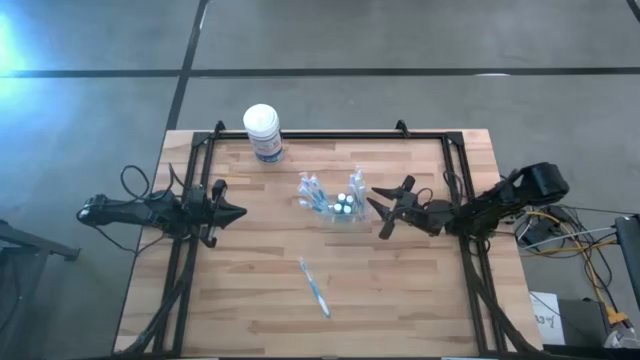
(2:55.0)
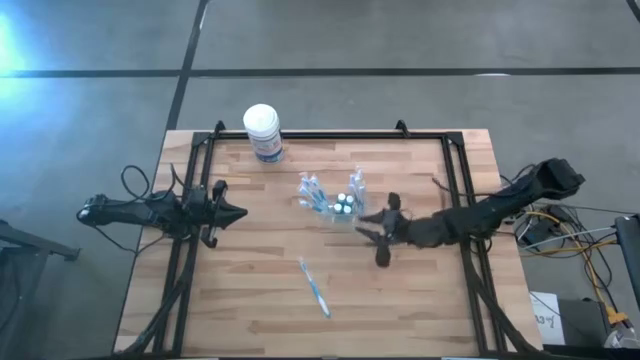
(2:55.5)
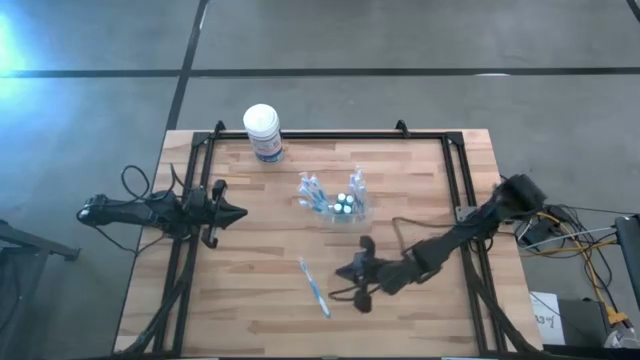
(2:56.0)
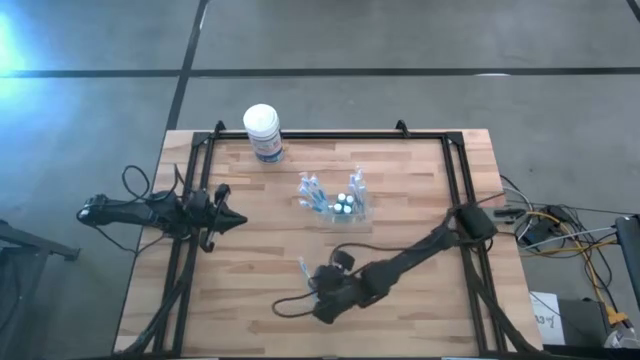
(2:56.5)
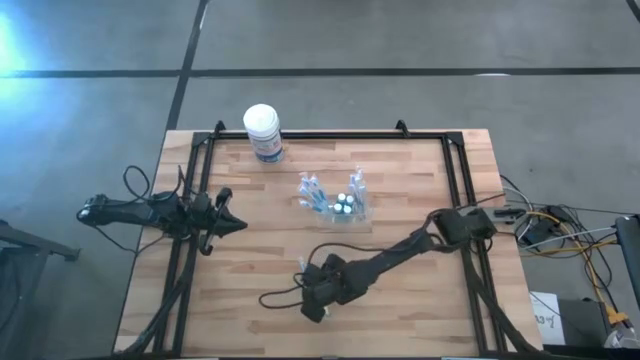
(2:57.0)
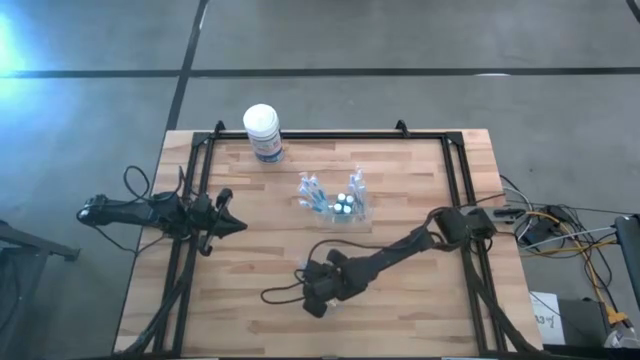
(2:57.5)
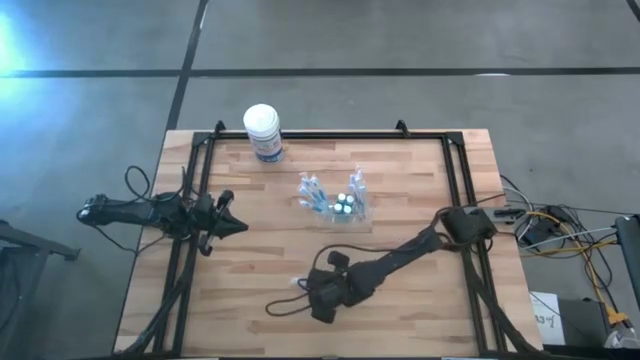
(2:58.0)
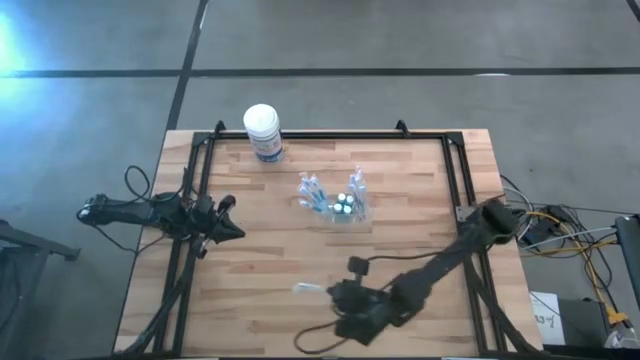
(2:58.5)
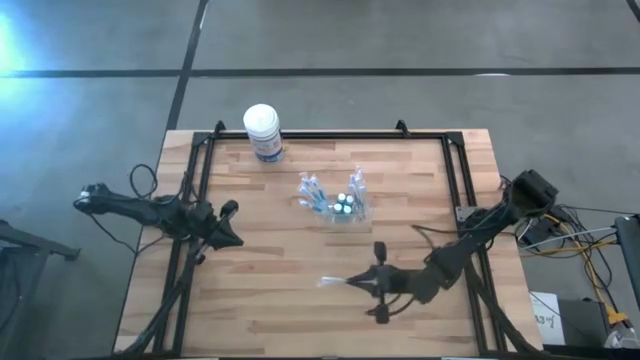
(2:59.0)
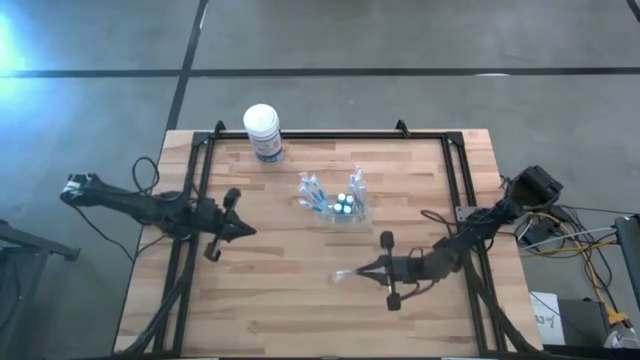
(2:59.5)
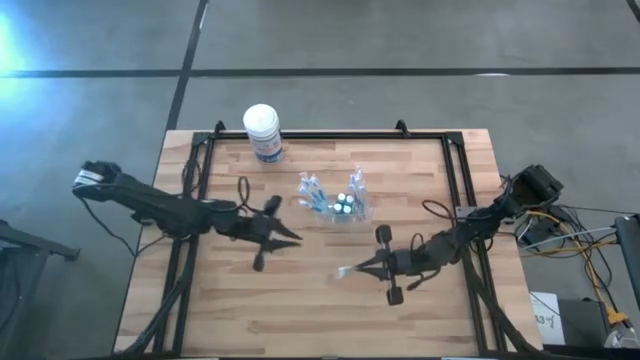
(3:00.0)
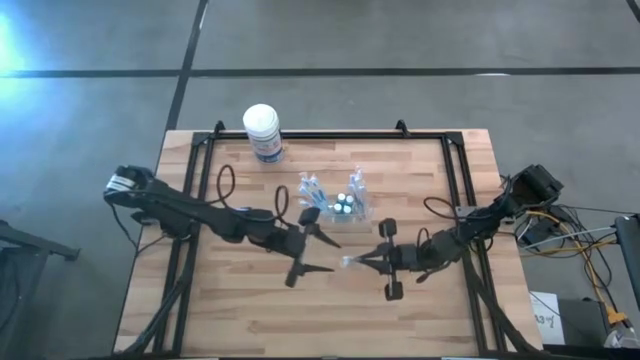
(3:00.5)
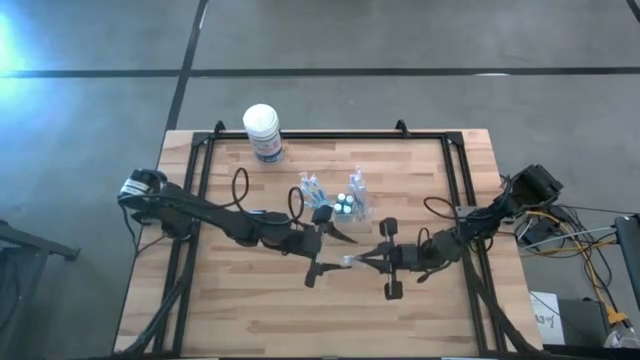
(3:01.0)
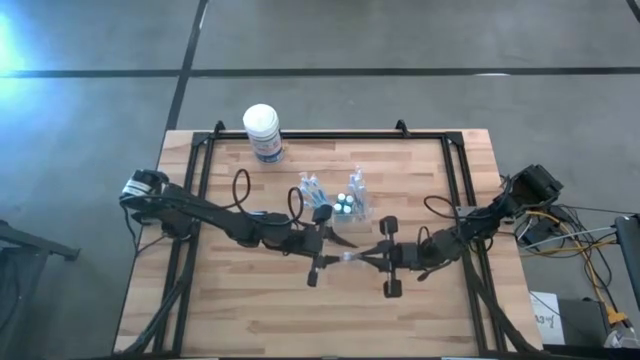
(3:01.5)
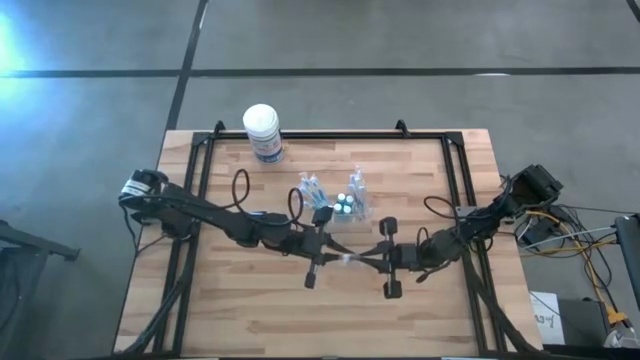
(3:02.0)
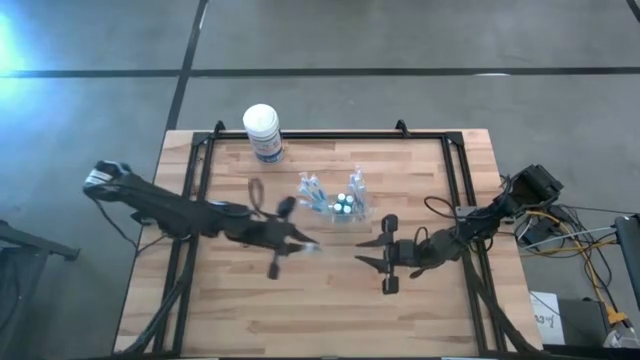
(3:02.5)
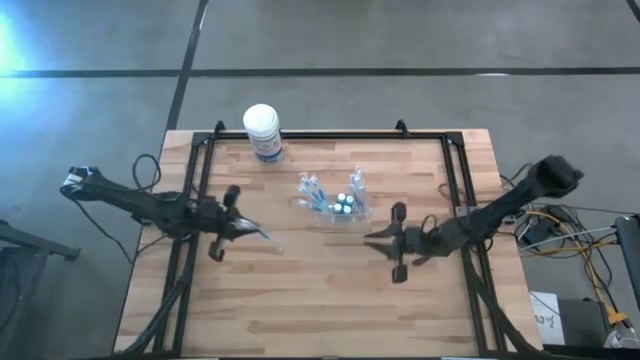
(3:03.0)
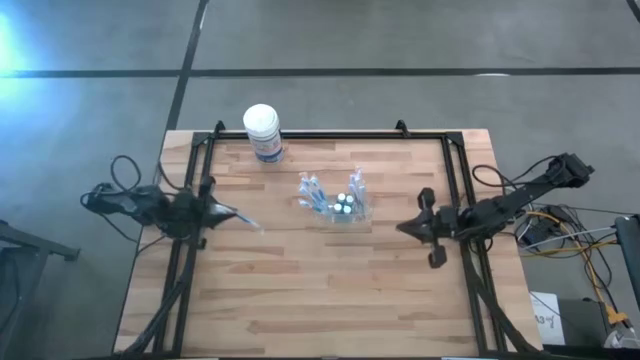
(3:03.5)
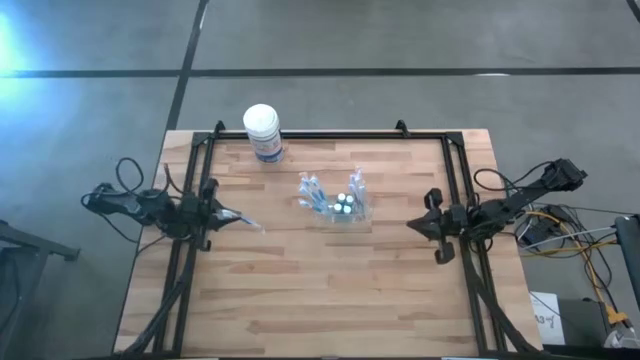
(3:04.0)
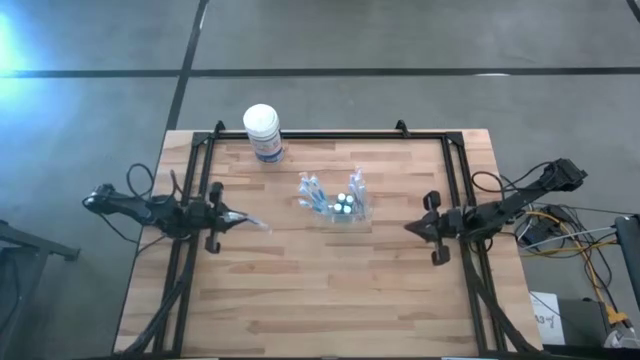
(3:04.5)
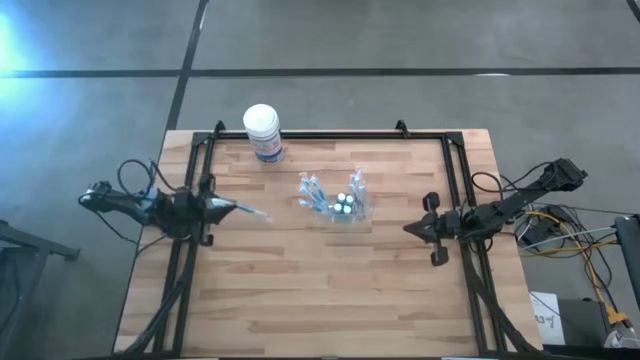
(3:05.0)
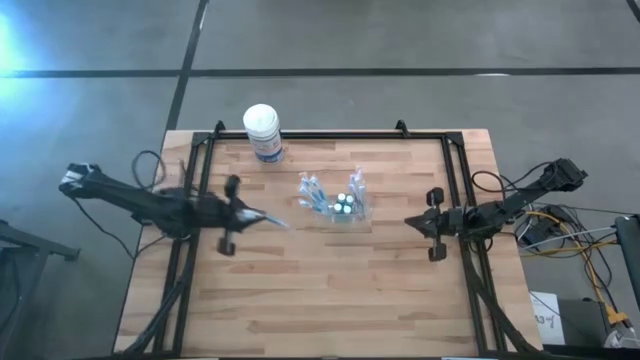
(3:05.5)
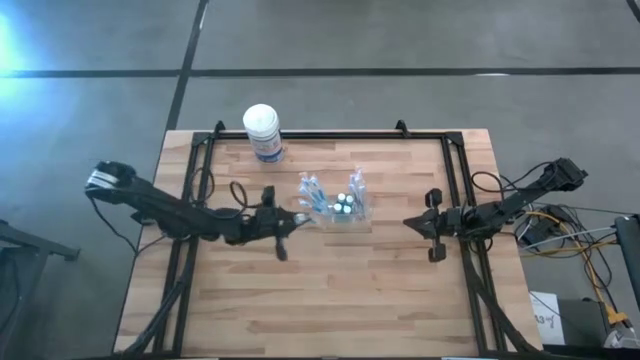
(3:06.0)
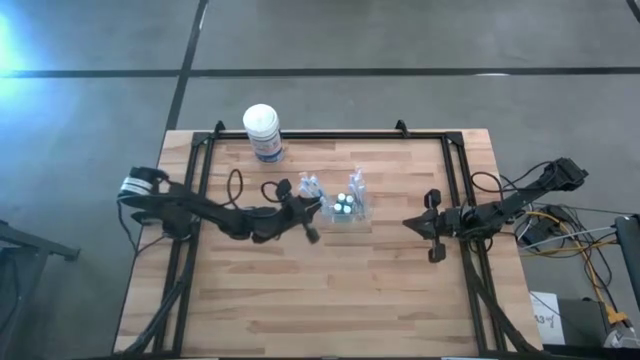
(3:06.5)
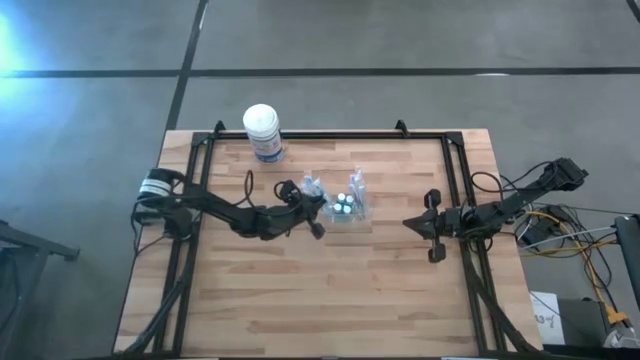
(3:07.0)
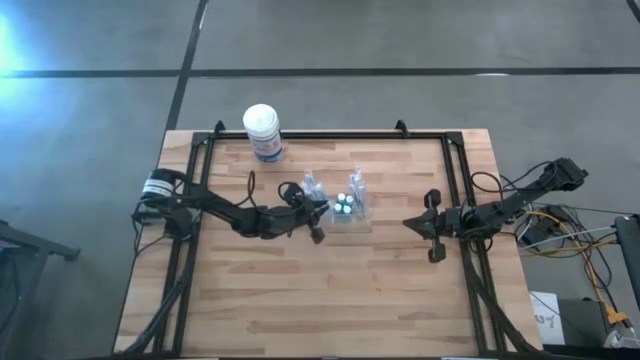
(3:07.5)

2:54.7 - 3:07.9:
Task: Pick & Place toothbrushing station
Put the blue toothbrush into the transparent organizer

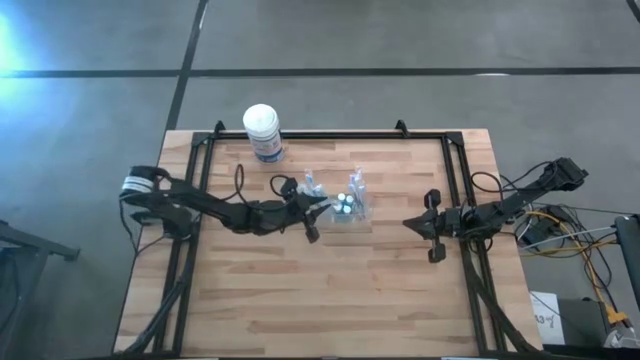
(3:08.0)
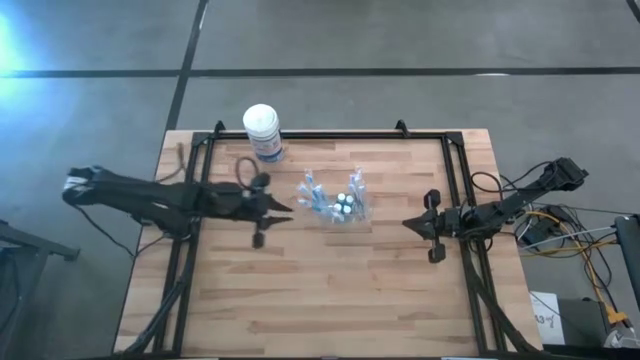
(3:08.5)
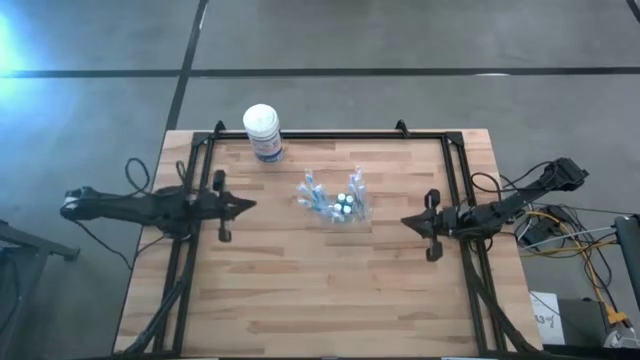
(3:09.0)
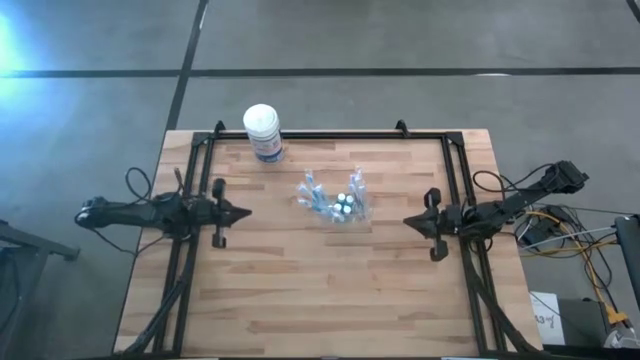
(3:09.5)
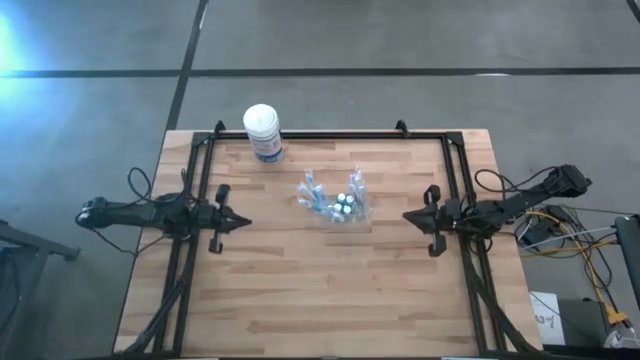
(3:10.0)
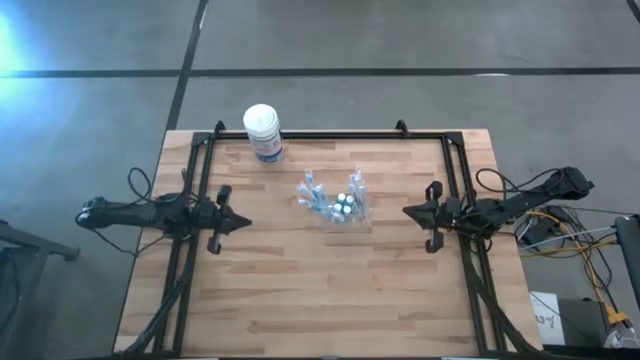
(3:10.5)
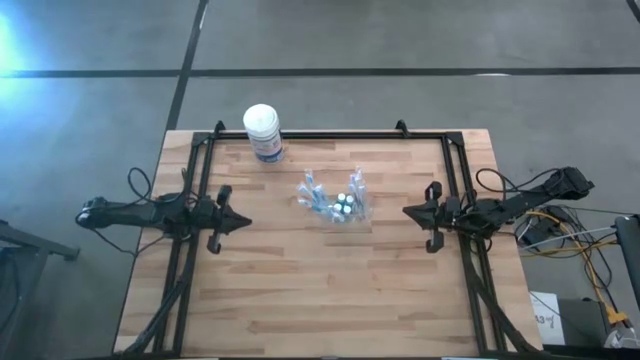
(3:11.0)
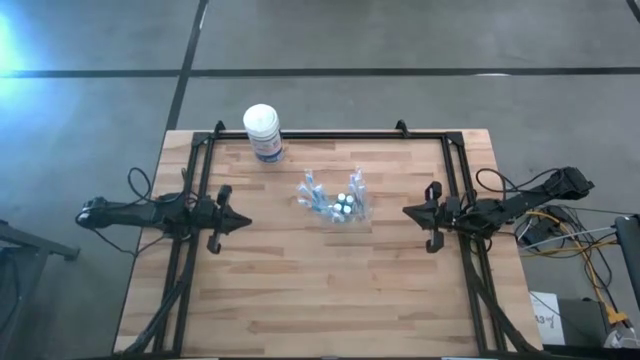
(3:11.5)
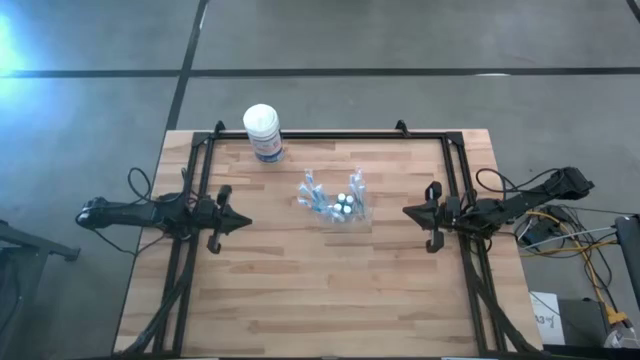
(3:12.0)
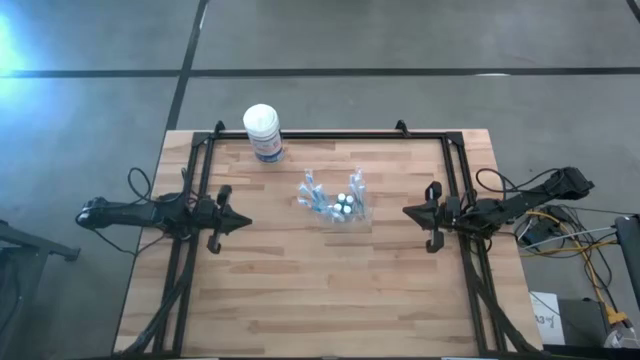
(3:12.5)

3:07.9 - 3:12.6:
Return to Home Position

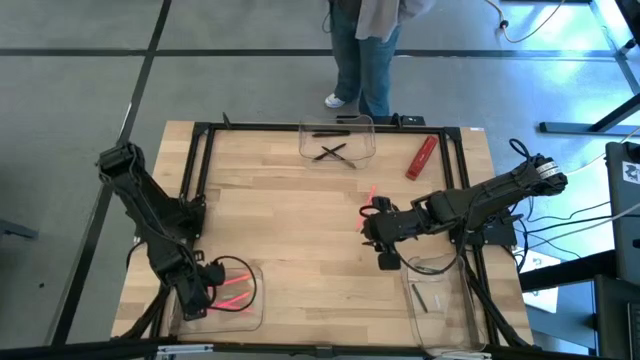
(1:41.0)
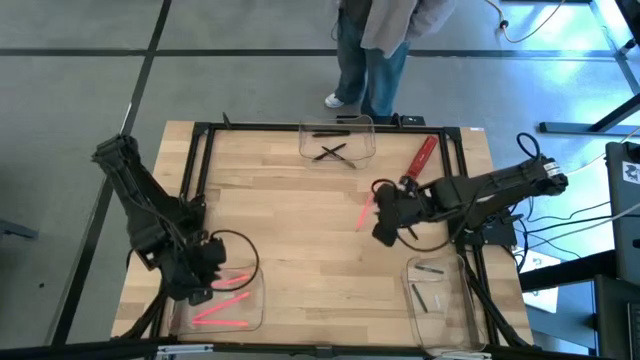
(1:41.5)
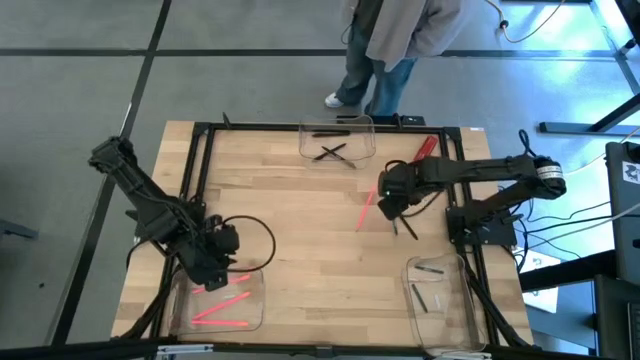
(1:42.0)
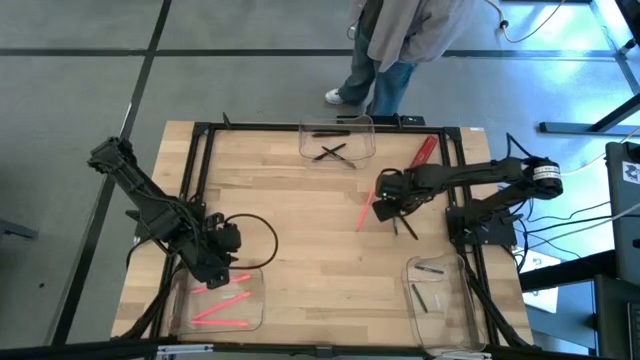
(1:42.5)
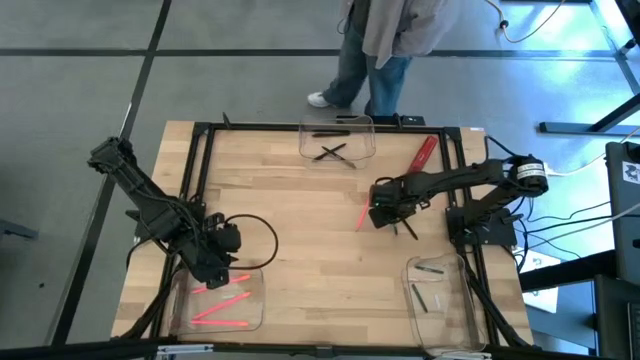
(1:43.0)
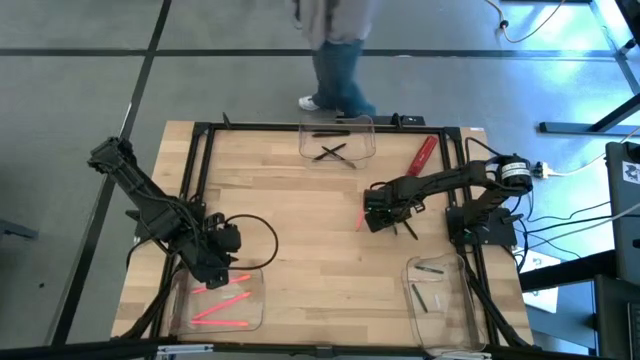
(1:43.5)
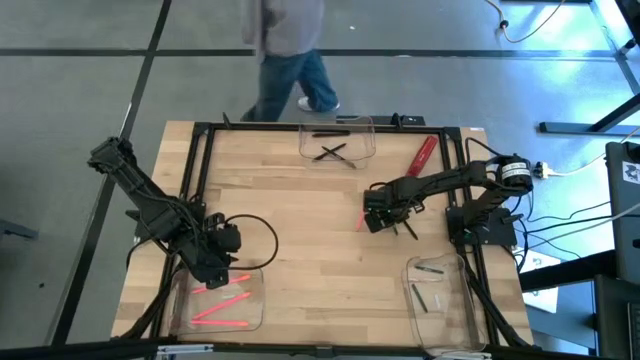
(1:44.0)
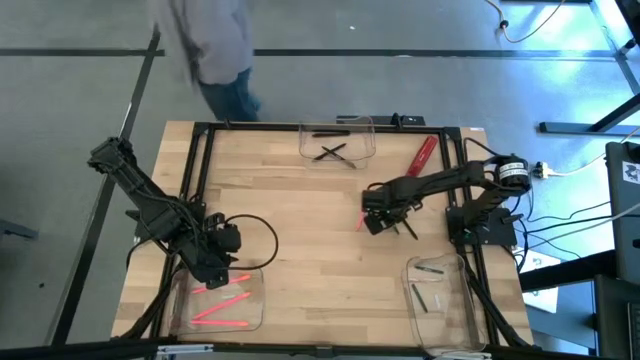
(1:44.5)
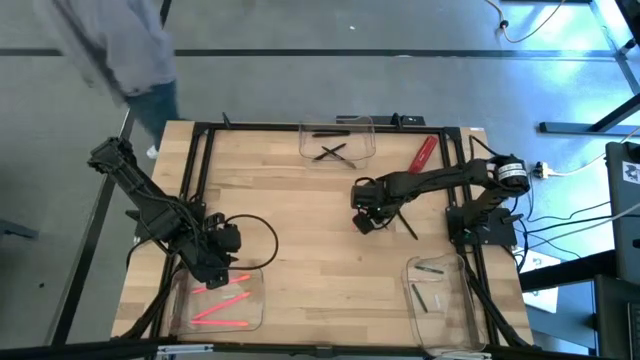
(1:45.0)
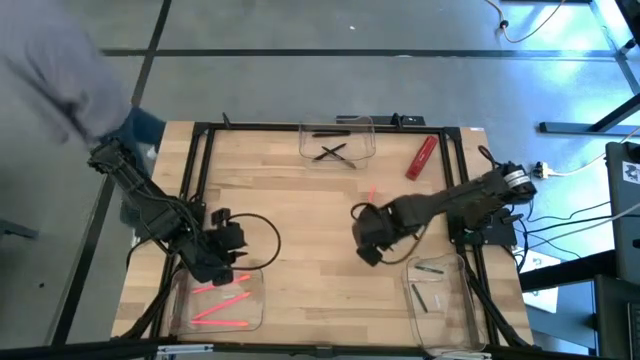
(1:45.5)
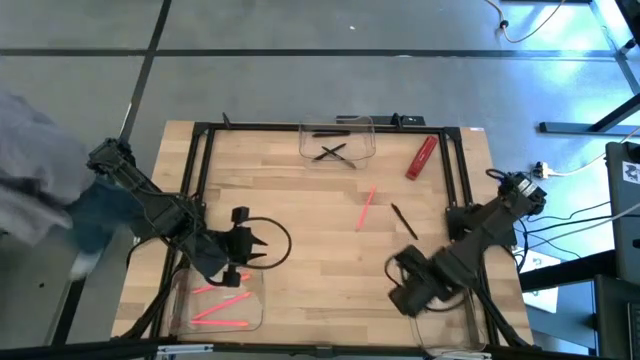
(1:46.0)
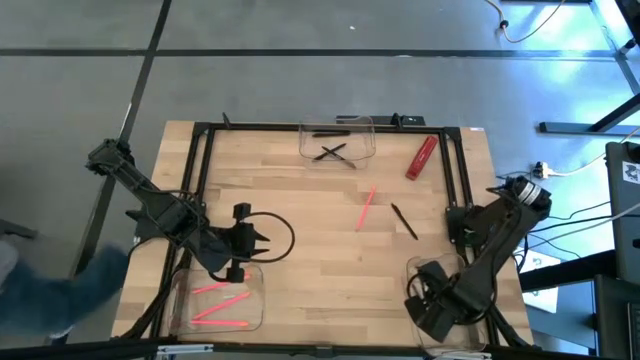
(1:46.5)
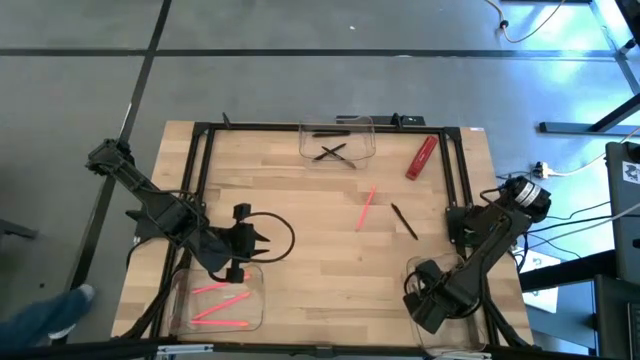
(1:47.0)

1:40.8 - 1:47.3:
Task: Sort crayons/erasers/pens/pencils in bins
Put the green crayon into the bottom right transparent bin
